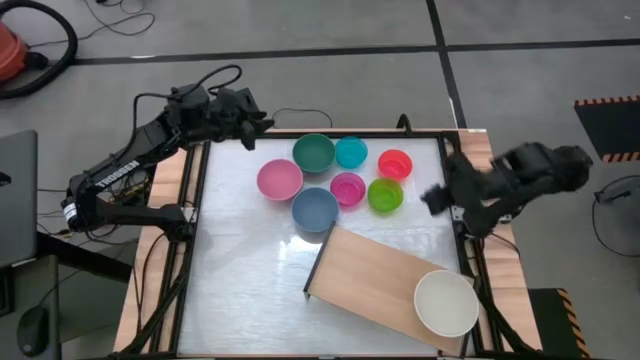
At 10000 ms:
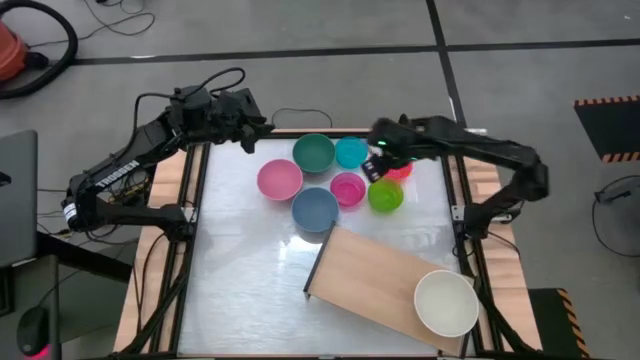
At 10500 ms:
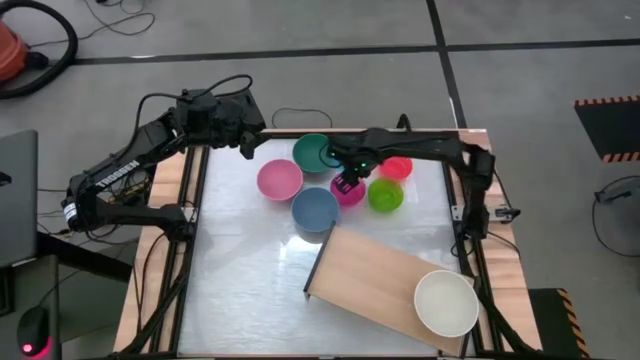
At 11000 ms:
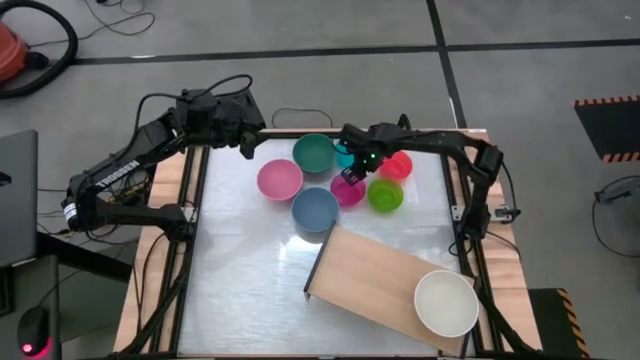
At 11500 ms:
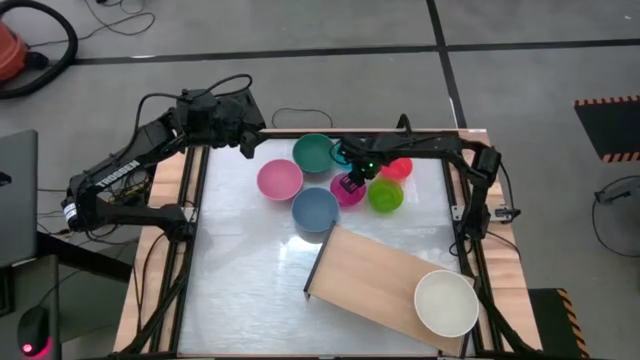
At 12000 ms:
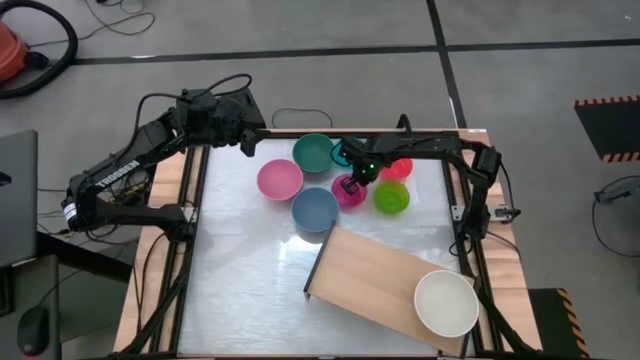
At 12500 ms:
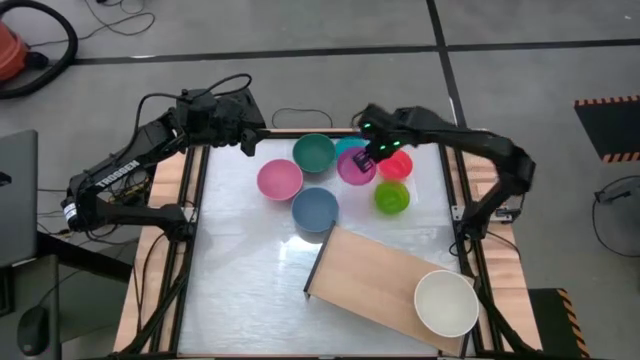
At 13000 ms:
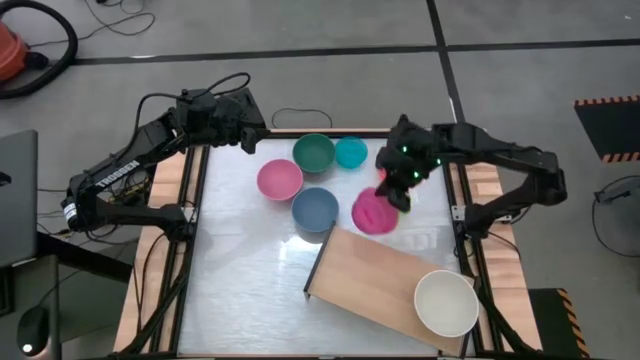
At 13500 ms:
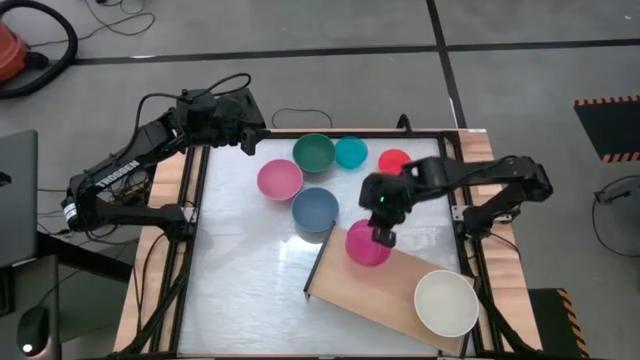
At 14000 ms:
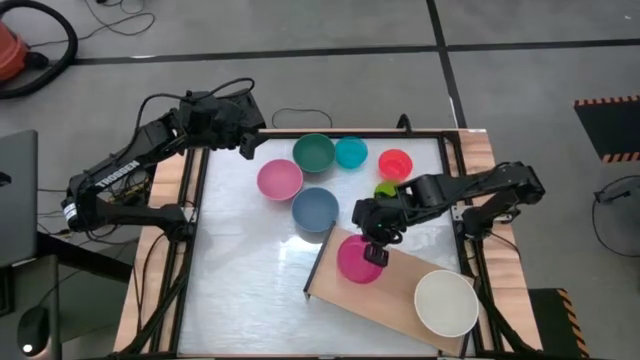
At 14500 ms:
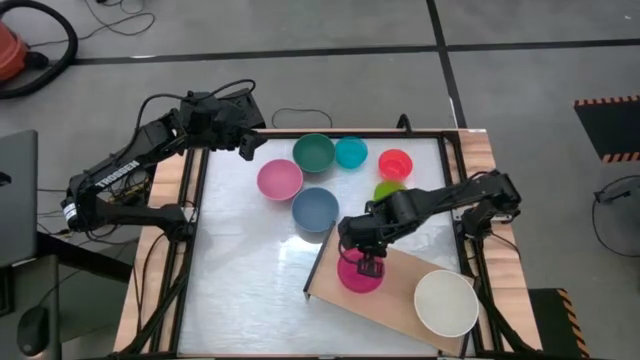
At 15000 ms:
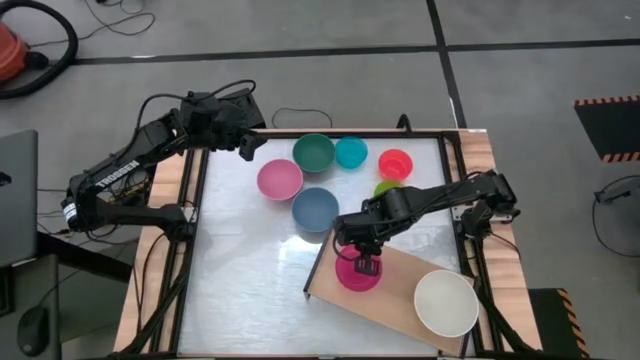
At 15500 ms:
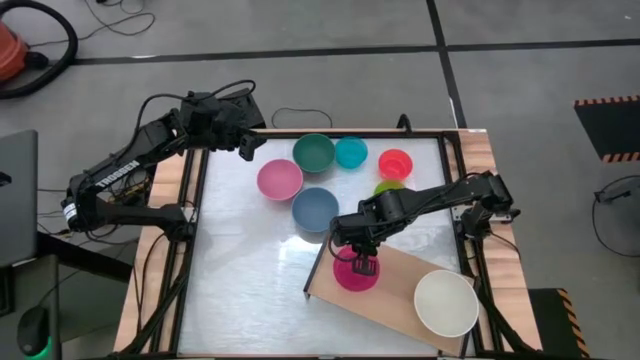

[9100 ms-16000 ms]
Task: Place and stack bowls onto a shelf
Put the transparent pink bowl on the shelf

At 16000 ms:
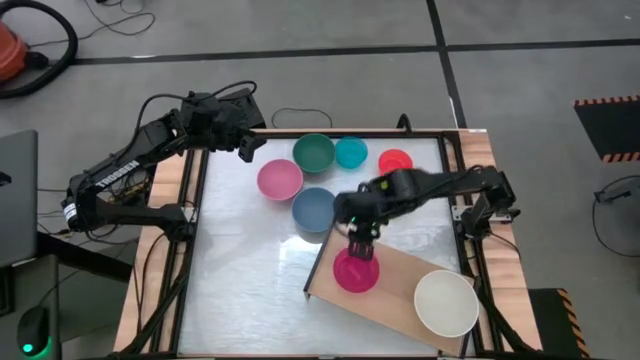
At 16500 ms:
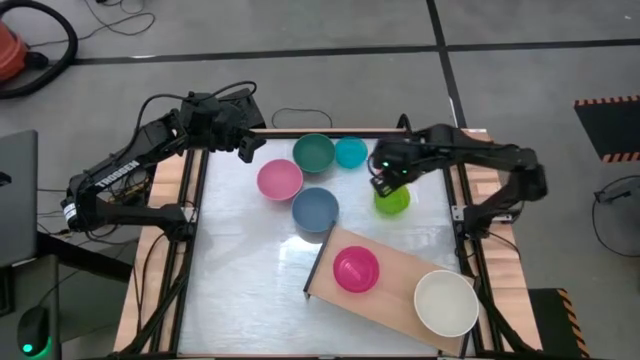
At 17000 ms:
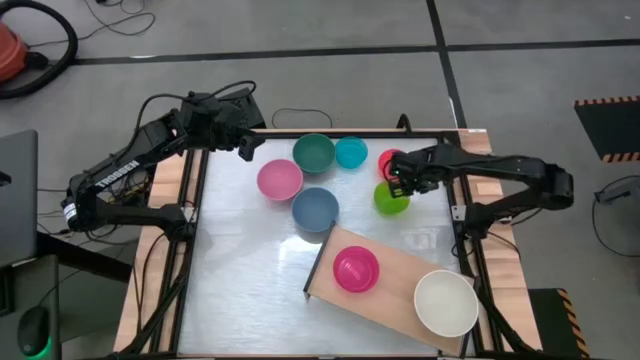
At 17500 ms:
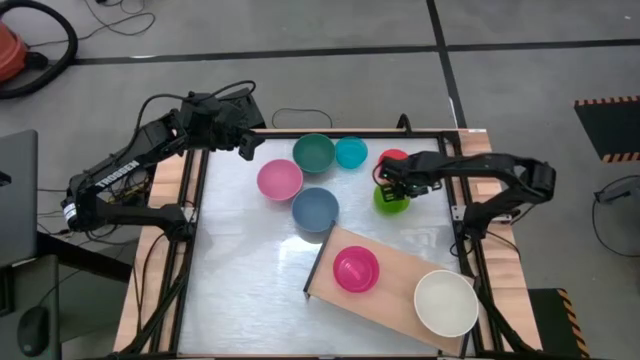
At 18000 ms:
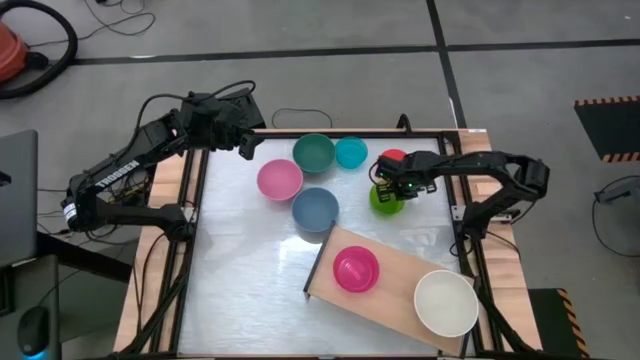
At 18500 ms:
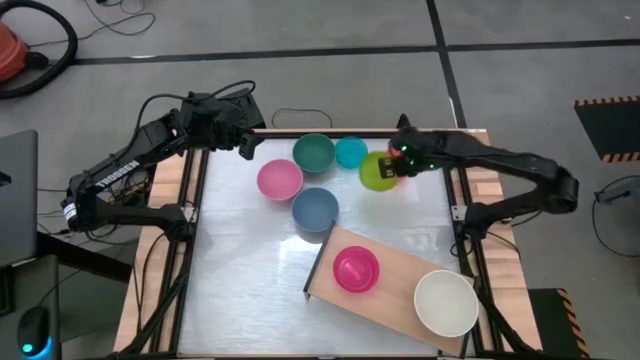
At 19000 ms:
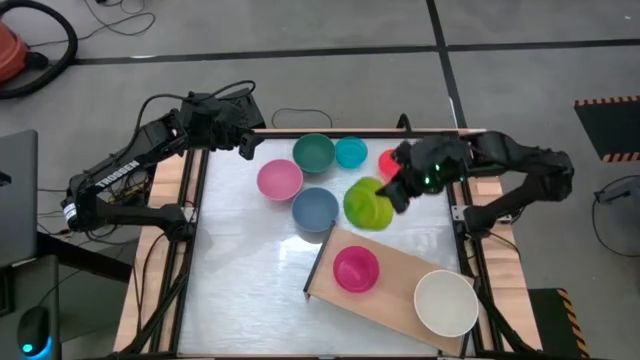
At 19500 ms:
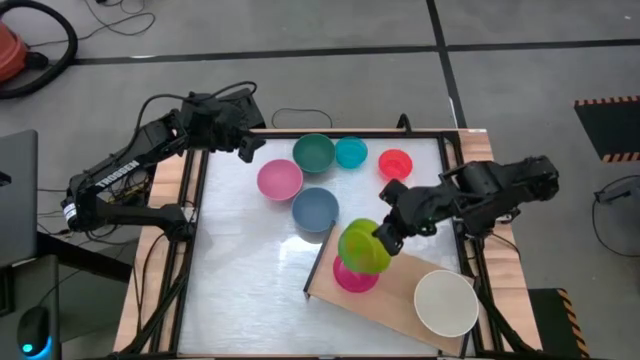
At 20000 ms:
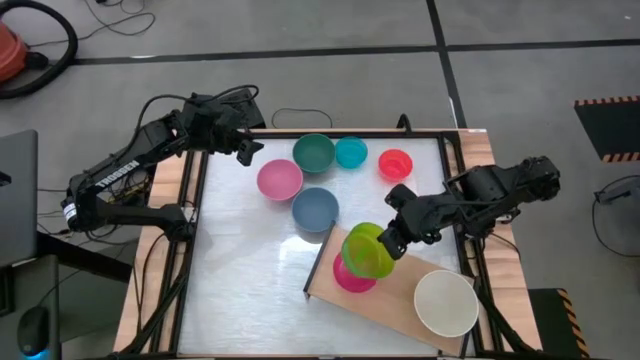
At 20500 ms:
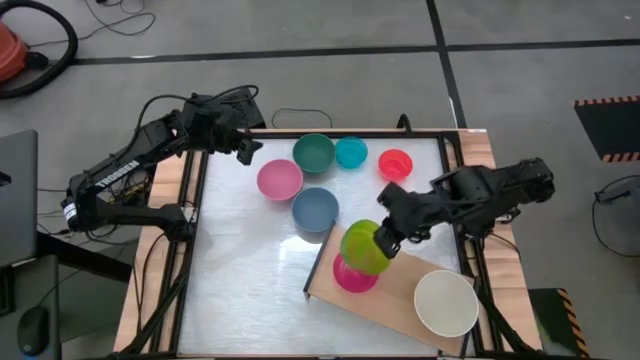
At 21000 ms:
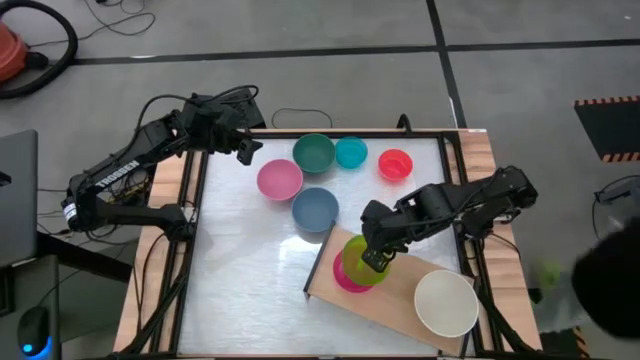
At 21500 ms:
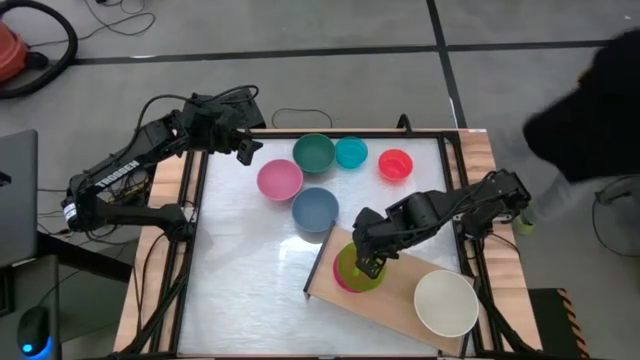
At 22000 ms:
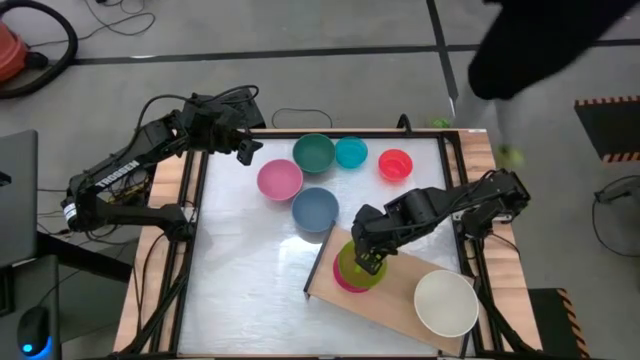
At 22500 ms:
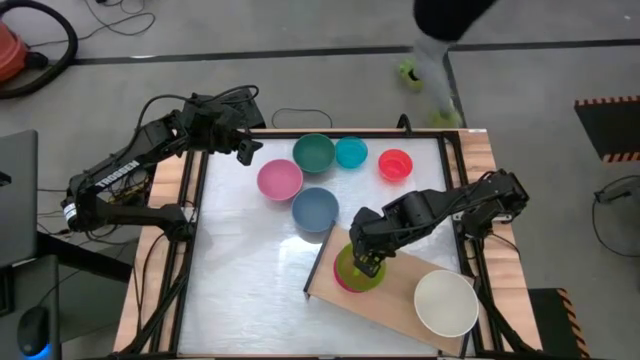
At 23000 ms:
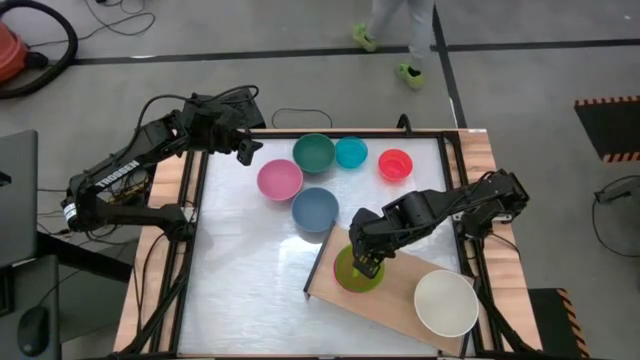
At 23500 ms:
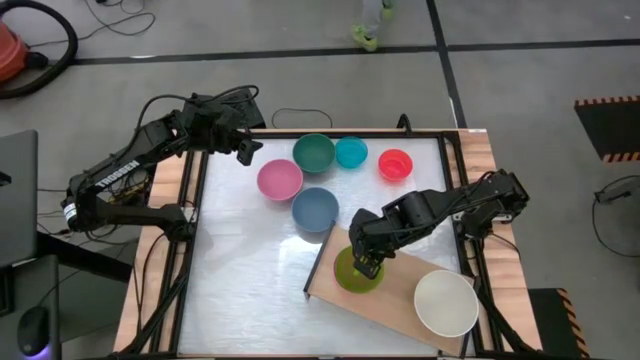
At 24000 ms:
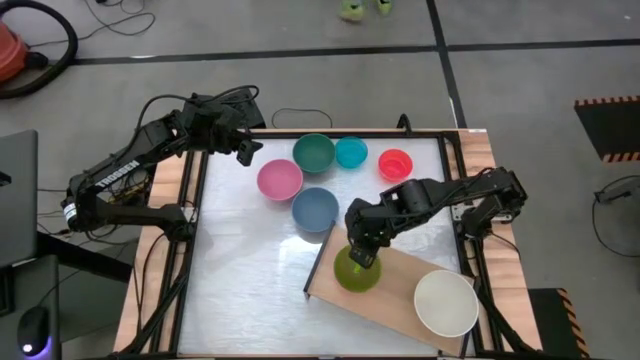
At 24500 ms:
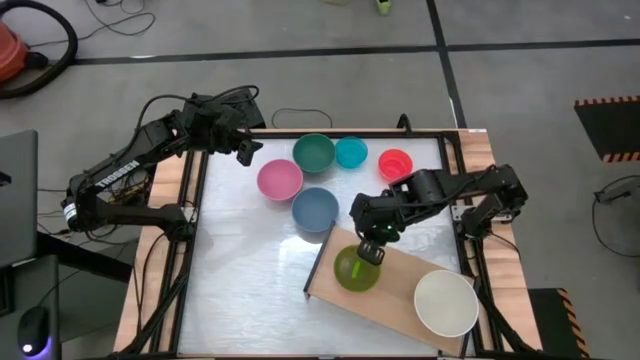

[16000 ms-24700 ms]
Stack the transparent green bowl on top of the transparent pink bowl on the shelf

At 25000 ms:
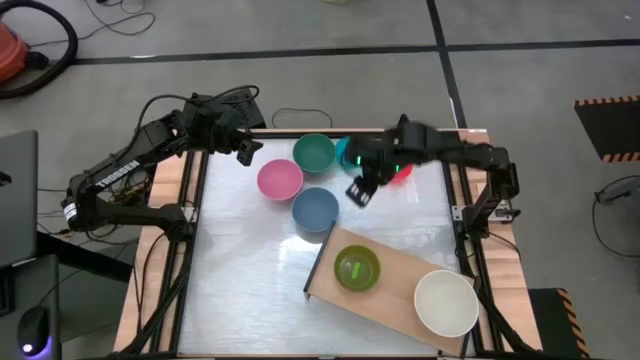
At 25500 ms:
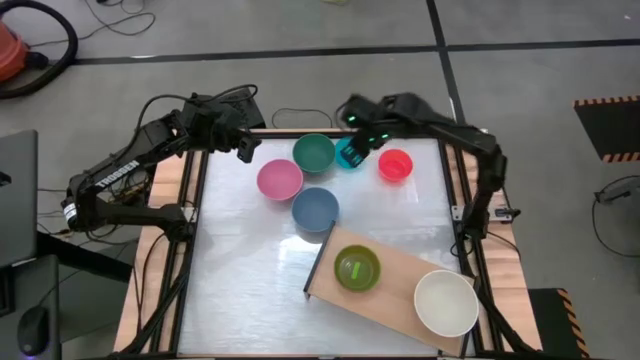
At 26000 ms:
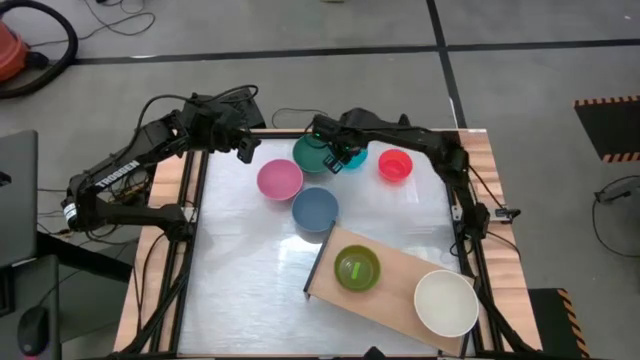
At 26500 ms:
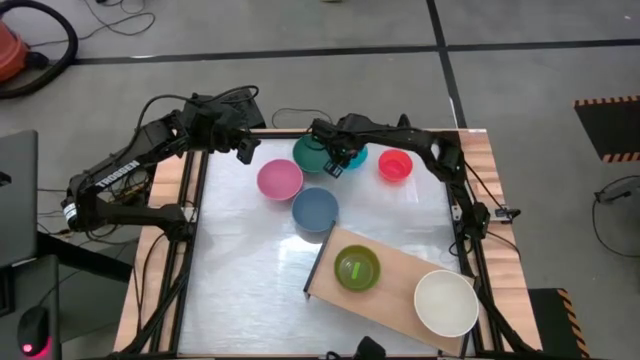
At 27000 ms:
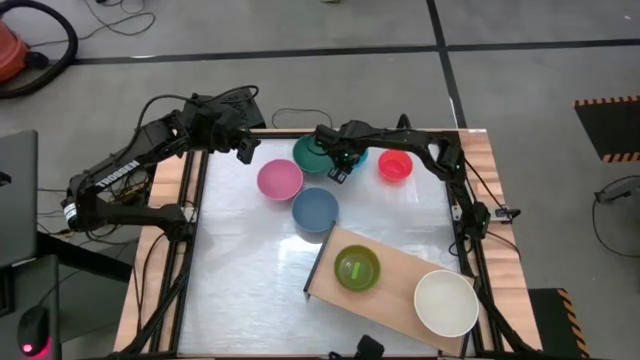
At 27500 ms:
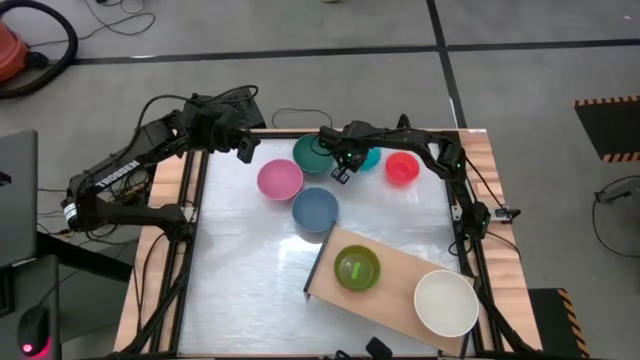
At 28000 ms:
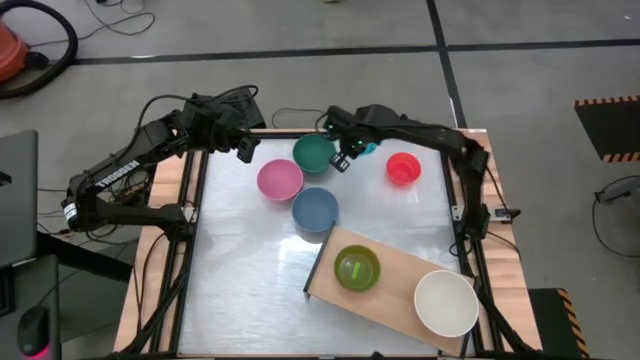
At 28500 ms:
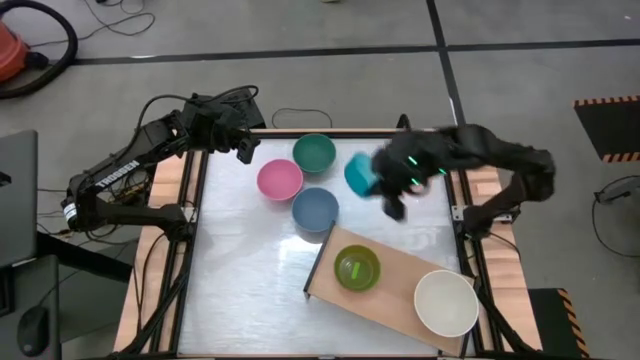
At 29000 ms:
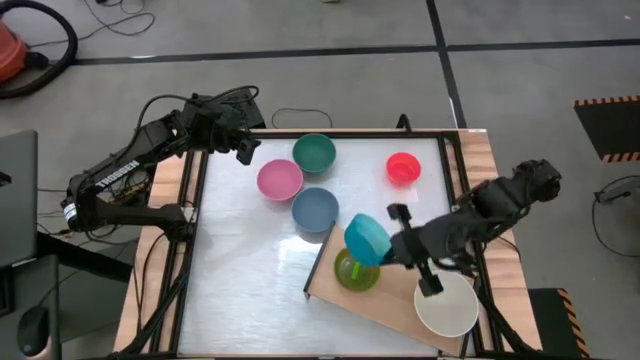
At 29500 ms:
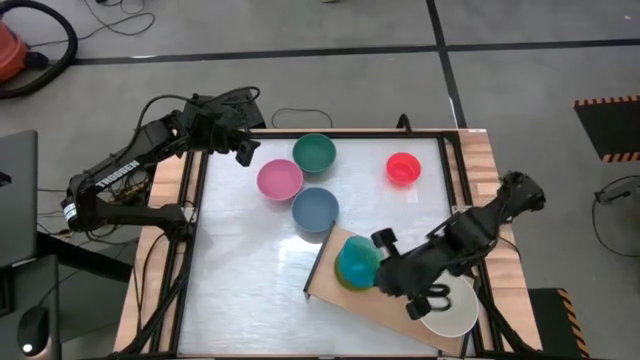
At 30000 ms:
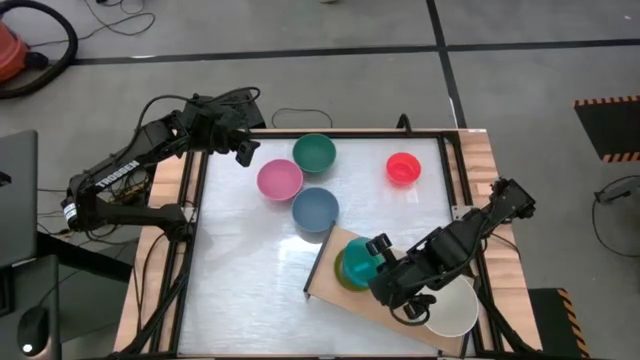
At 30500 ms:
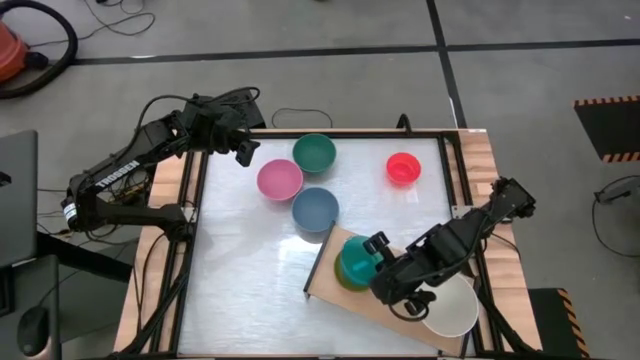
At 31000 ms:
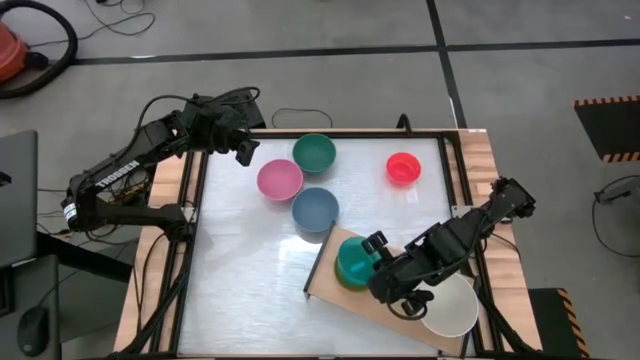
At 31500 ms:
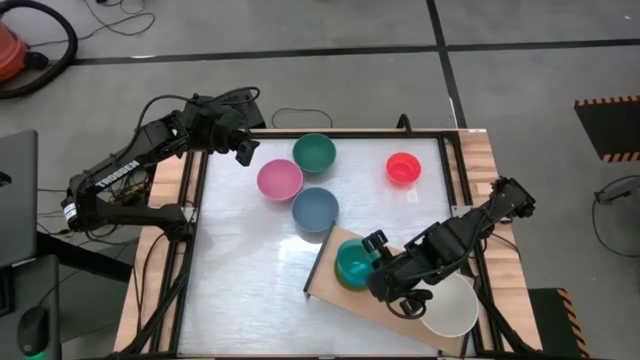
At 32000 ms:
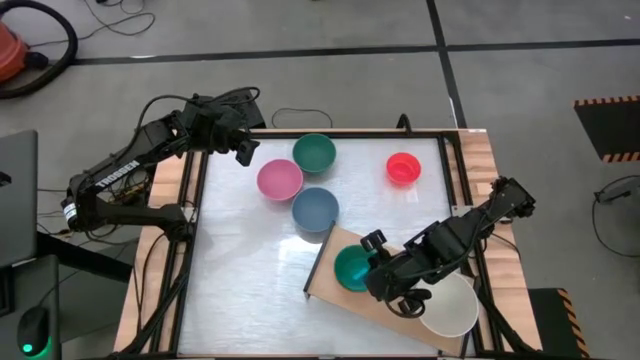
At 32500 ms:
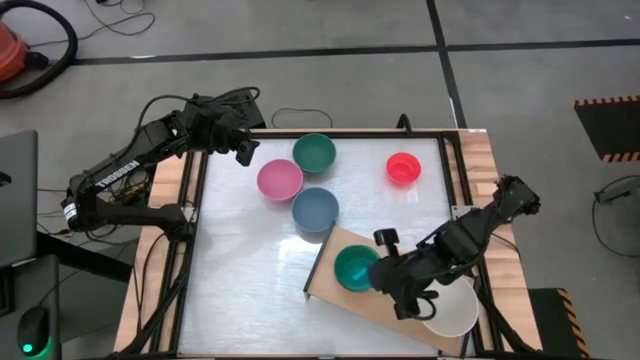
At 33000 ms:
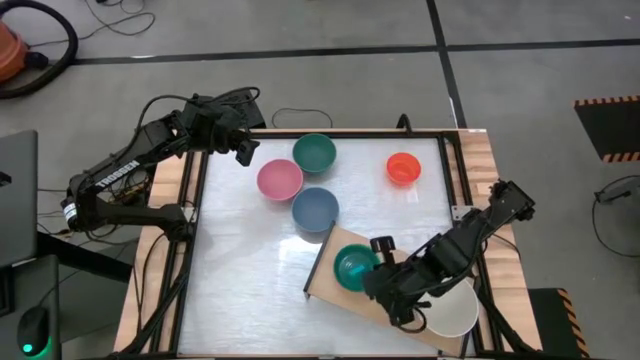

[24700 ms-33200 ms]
Stack the transparent blue bowl on top of the transparent green bowl on the shelf
